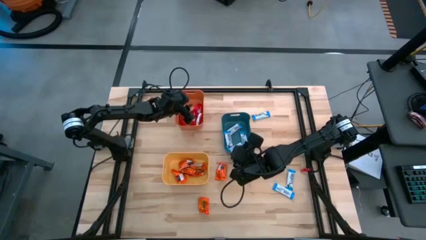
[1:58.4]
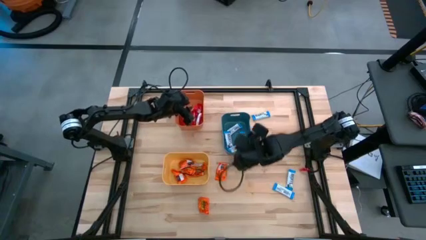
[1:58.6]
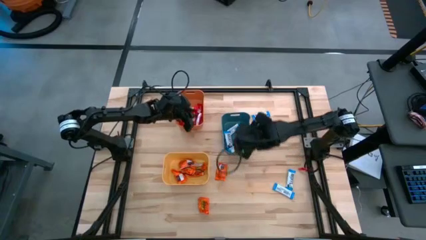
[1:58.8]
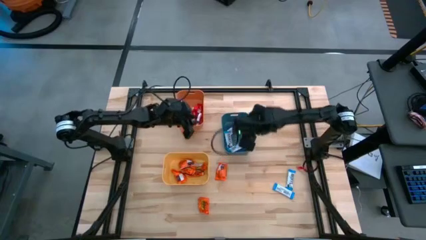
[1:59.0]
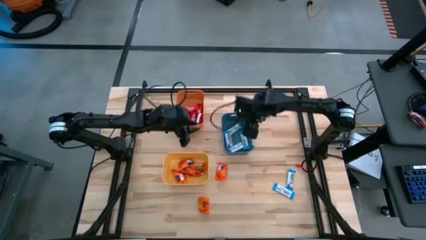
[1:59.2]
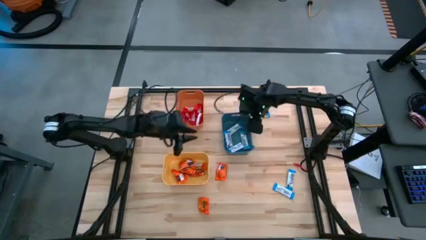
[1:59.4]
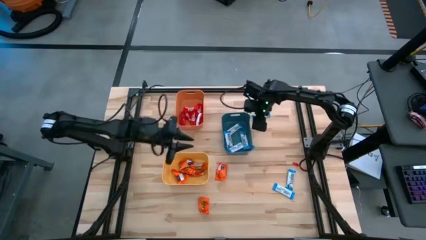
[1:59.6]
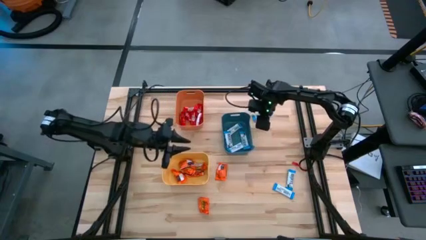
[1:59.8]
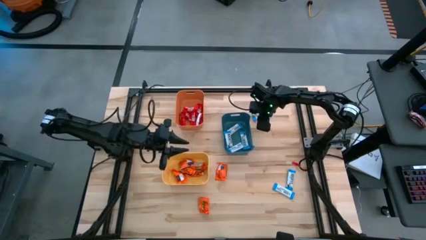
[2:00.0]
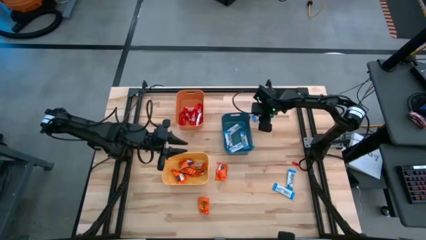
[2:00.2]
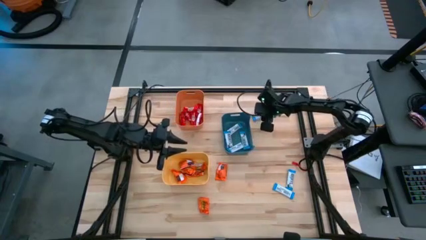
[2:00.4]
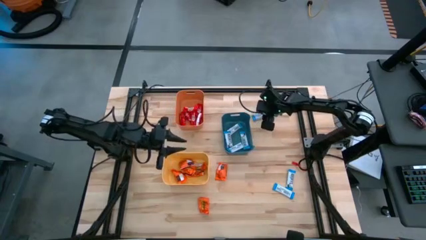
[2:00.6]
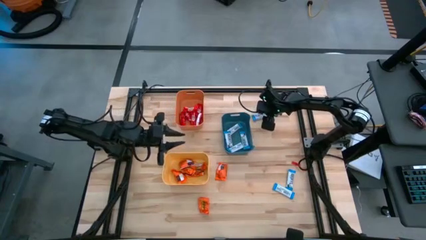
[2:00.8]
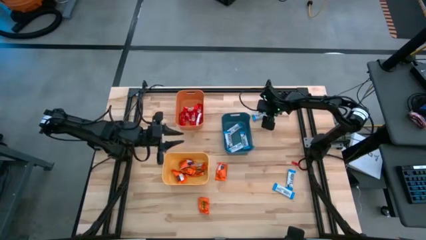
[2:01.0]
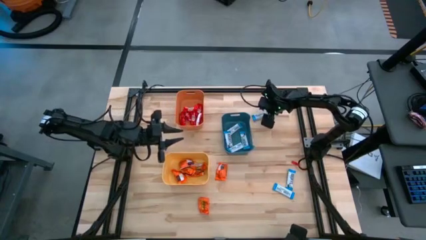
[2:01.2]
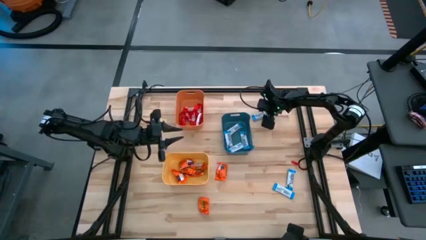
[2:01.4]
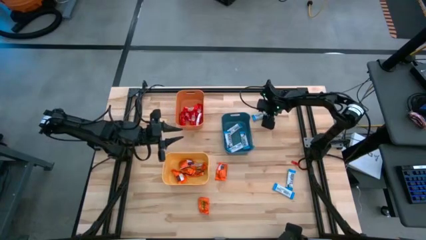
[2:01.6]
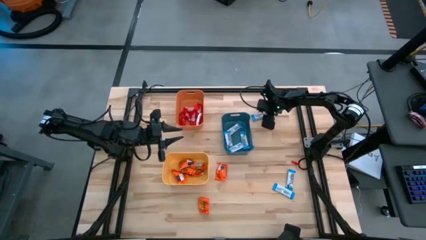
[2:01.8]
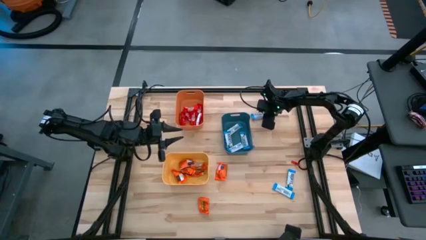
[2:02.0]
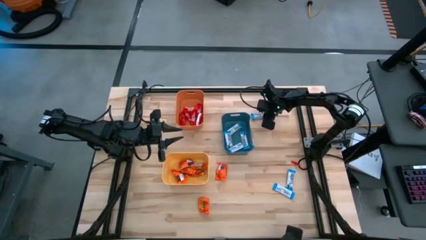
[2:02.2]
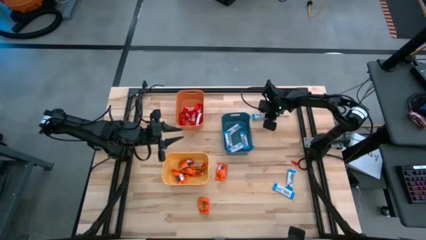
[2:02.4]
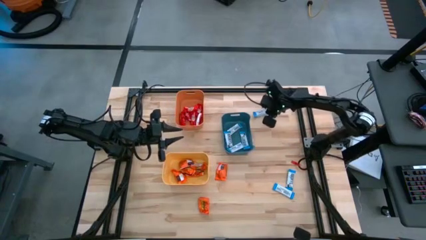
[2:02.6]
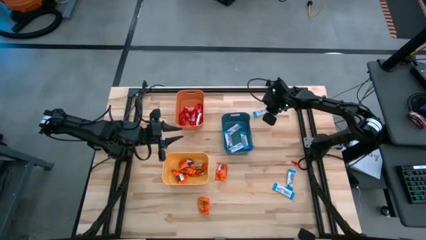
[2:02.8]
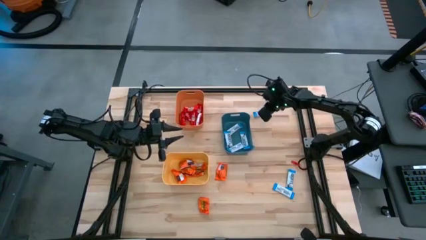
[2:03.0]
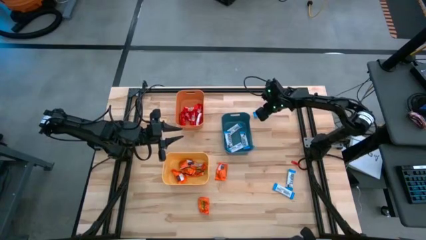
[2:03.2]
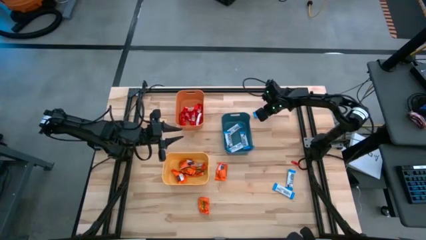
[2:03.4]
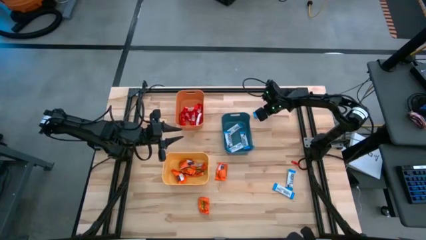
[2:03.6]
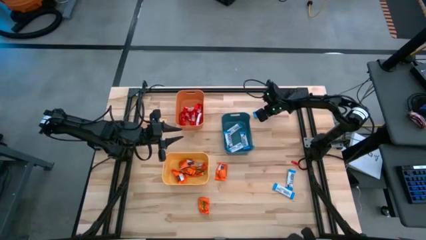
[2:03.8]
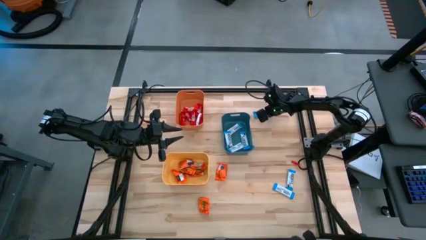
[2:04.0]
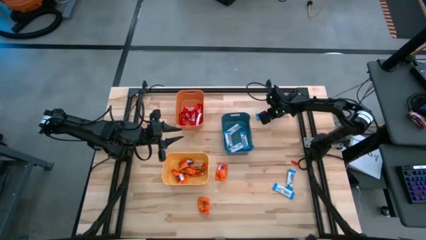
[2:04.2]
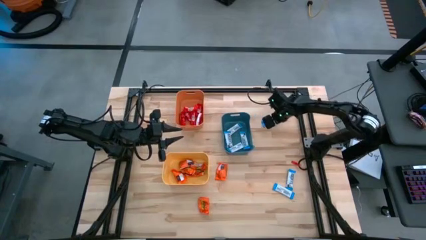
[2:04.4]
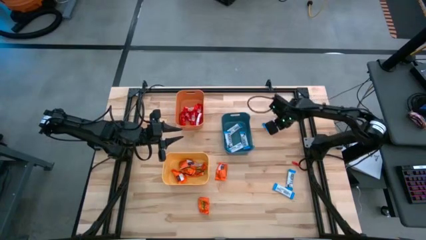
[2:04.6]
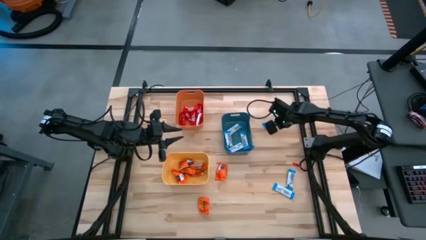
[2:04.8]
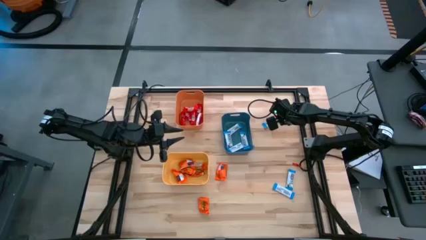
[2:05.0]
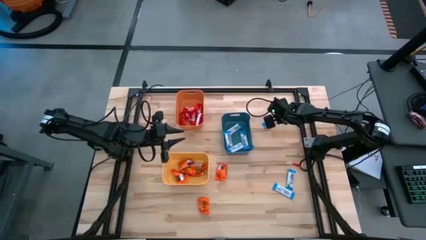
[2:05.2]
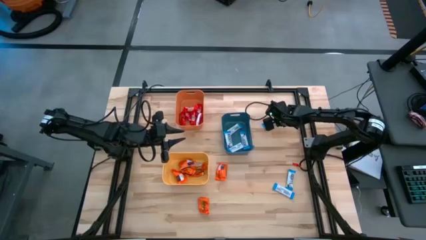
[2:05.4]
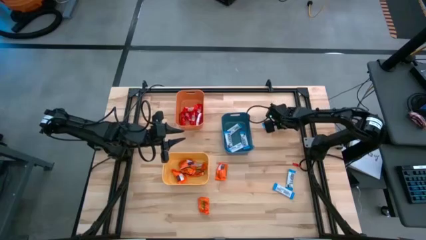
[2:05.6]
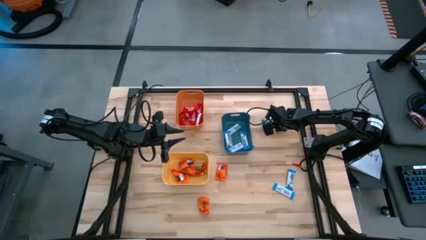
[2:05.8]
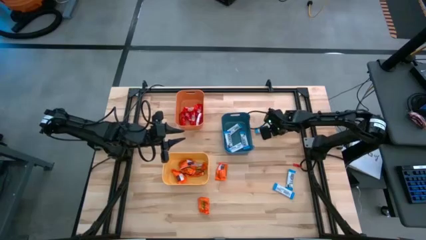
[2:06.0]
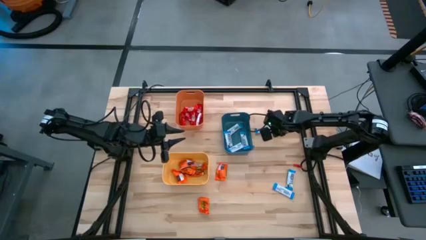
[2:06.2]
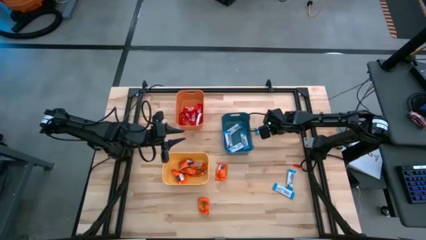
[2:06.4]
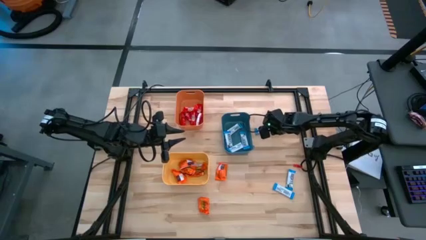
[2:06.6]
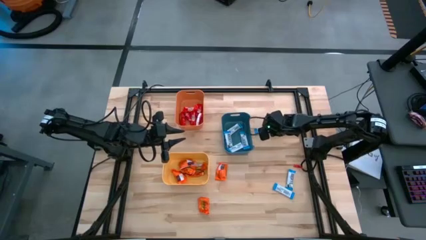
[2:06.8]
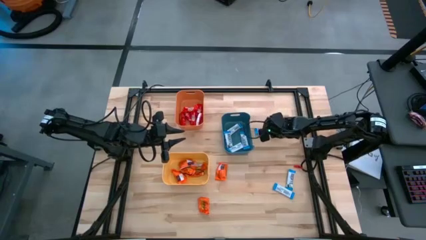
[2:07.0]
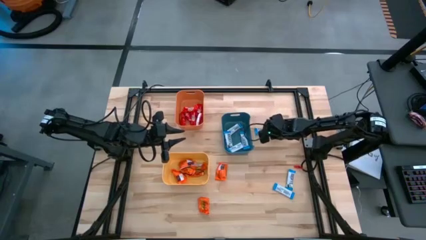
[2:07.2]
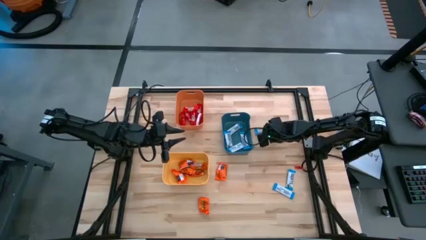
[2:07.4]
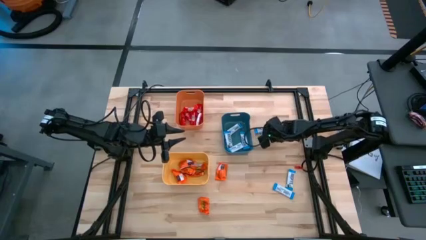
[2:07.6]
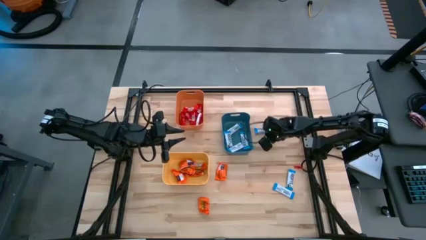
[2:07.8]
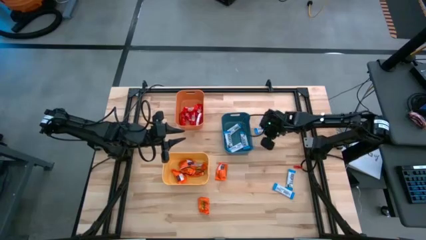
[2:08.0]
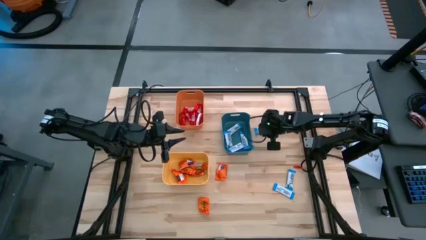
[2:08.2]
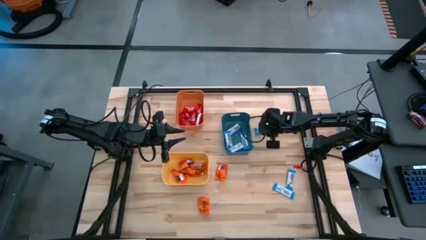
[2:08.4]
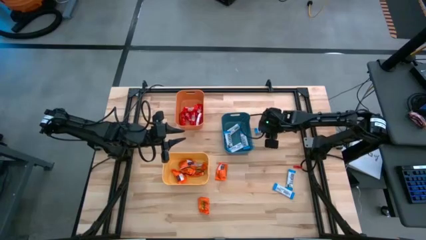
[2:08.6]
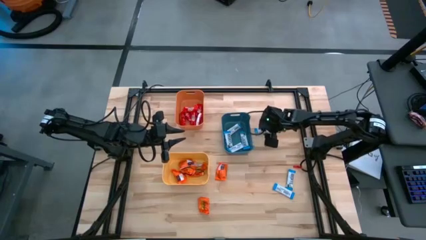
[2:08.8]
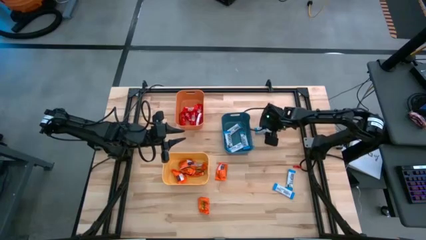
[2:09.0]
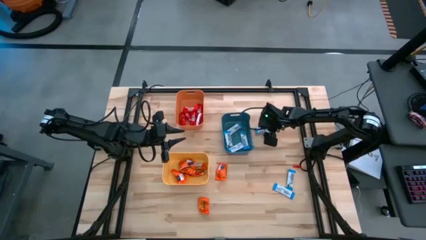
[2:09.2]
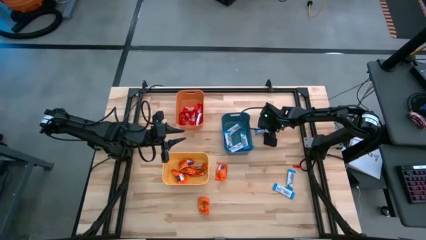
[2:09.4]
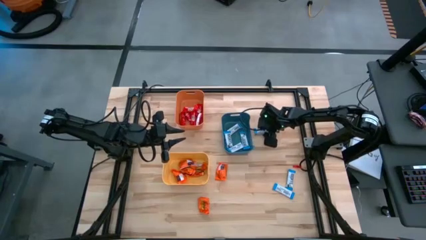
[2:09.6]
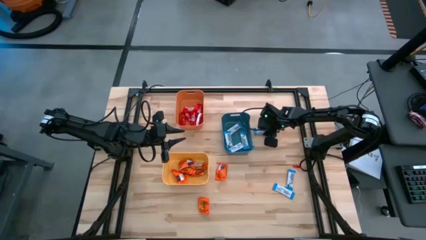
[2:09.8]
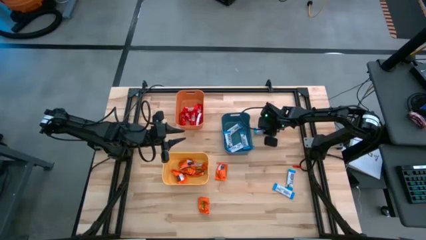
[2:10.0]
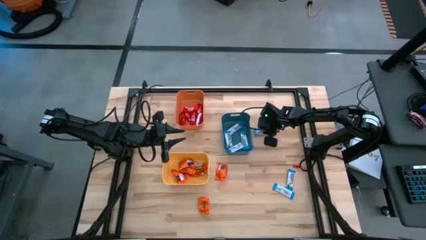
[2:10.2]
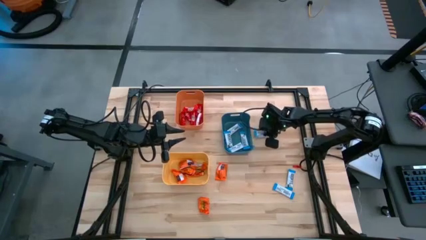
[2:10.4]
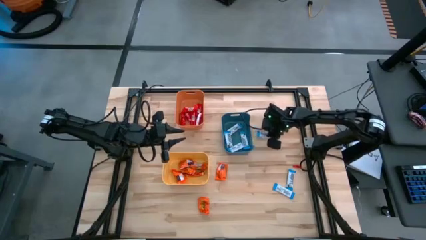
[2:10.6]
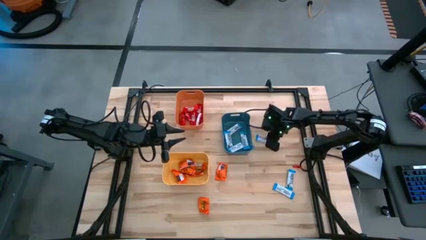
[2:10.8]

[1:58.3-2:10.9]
Task: Organize candy in baskets
Put the white chocolate into the blue bin

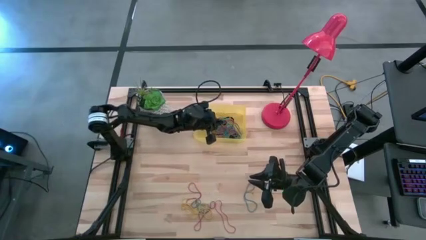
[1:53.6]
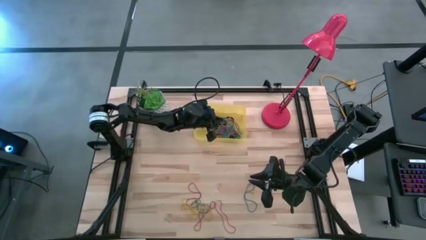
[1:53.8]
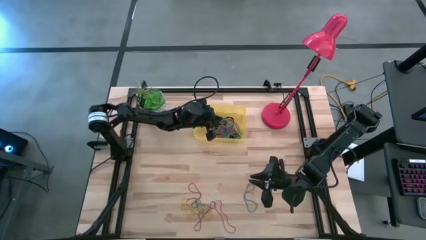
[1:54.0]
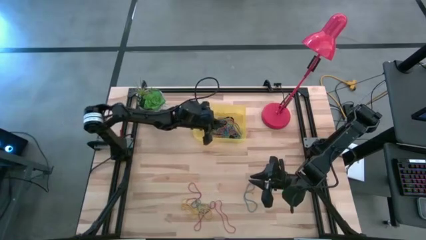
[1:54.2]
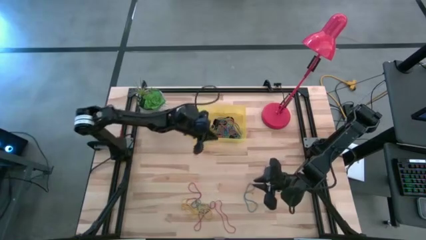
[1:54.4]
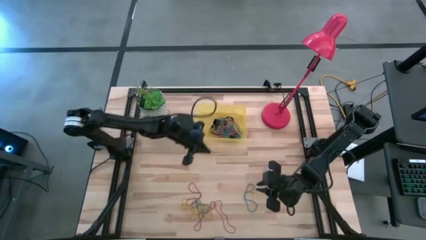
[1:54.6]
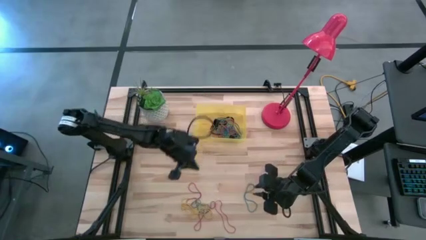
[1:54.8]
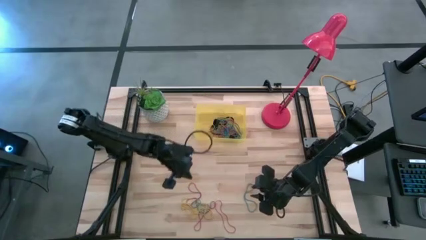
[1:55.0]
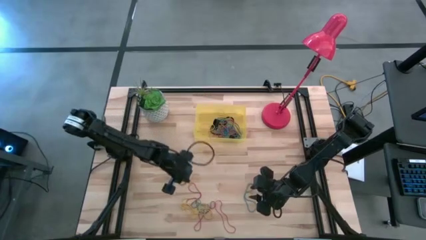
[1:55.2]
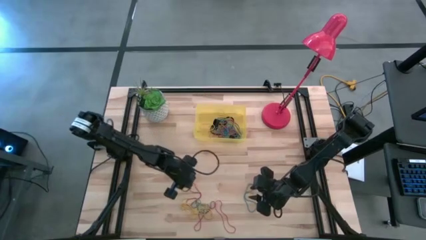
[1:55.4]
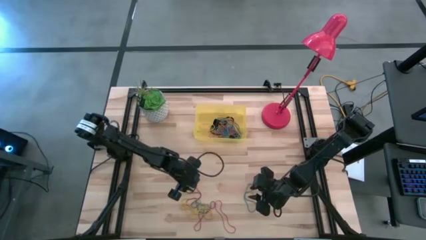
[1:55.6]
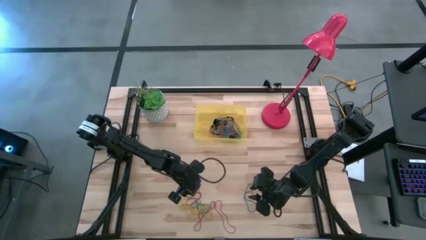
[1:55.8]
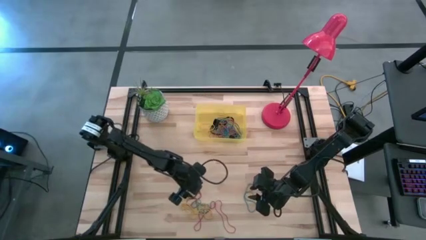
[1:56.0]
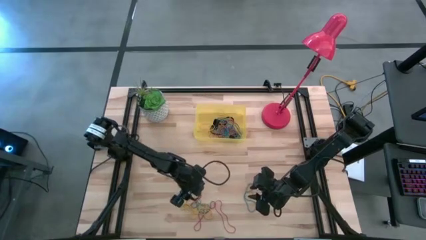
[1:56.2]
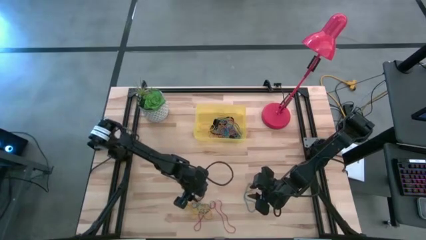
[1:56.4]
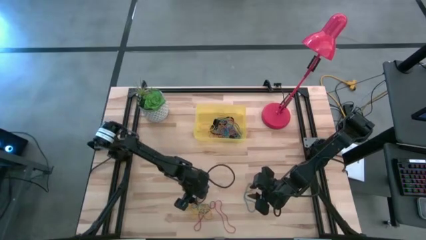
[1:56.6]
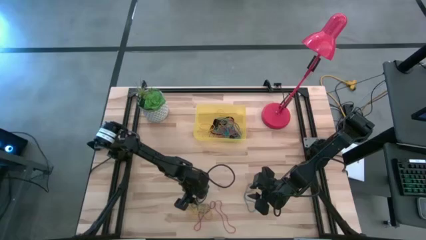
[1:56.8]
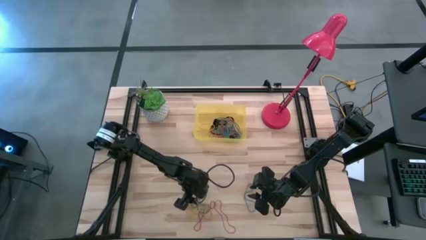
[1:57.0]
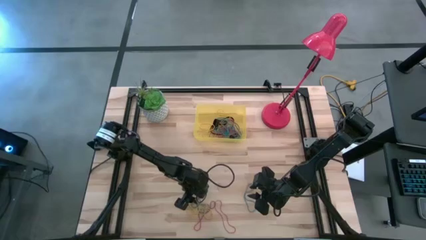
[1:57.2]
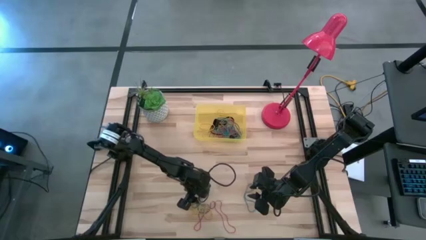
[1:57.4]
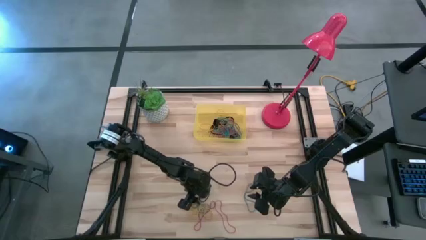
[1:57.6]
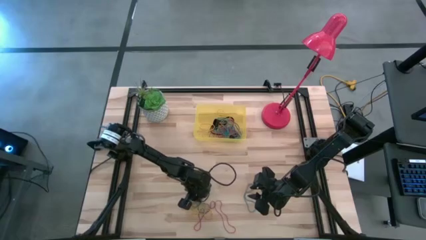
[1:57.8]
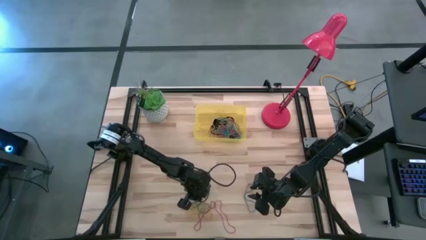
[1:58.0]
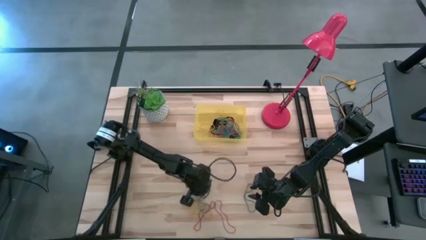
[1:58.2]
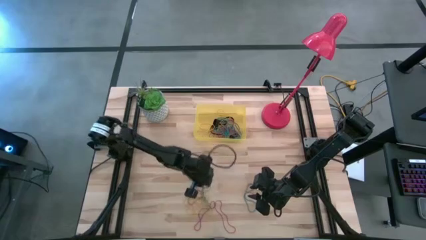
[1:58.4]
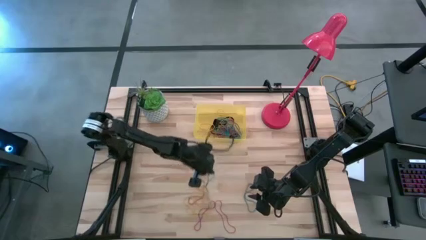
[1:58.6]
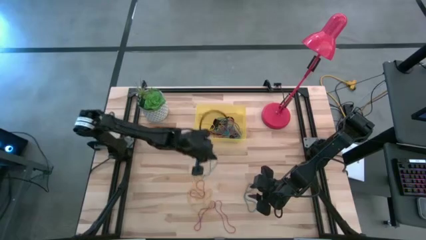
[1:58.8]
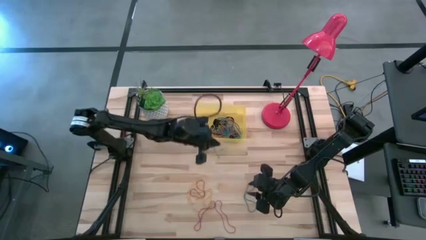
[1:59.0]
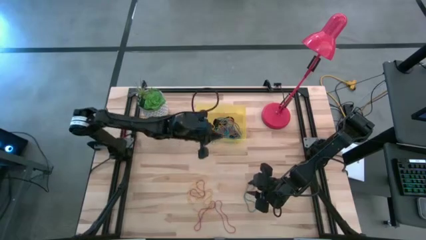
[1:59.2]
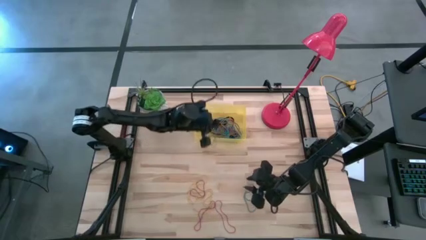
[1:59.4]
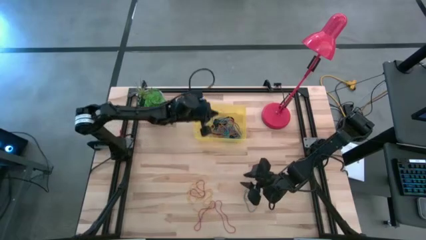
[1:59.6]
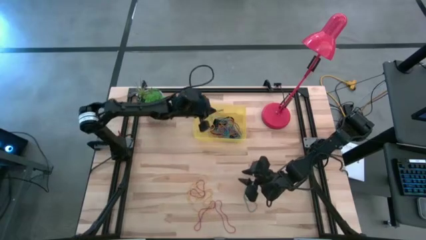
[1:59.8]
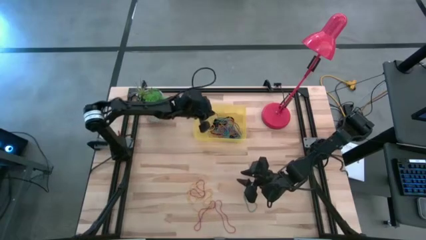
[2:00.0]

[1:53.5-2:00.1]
Task: Pick and place rubber bands into bin
Put the blue rubber band into the yellow bin
